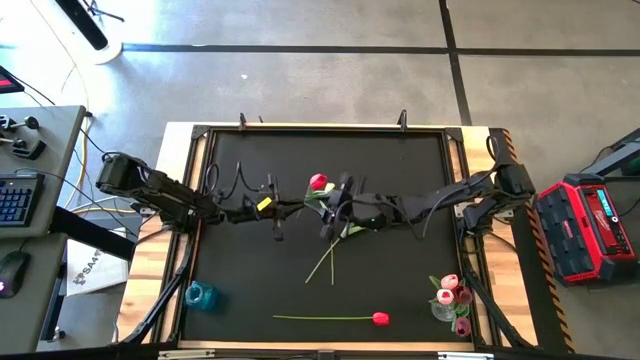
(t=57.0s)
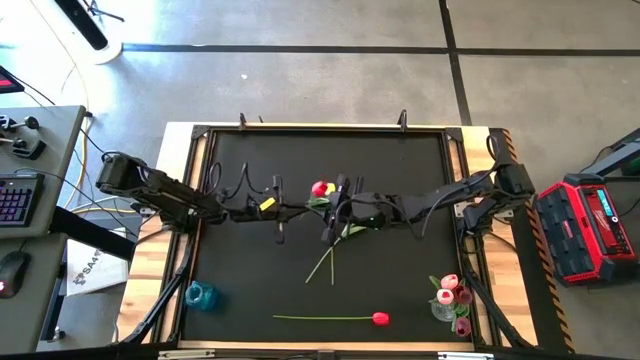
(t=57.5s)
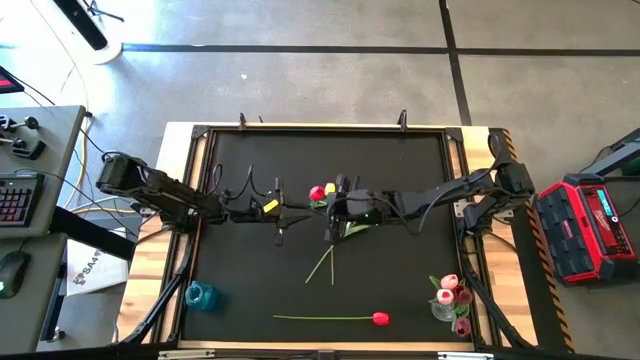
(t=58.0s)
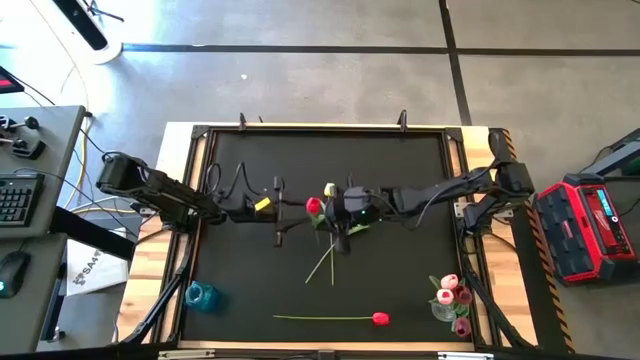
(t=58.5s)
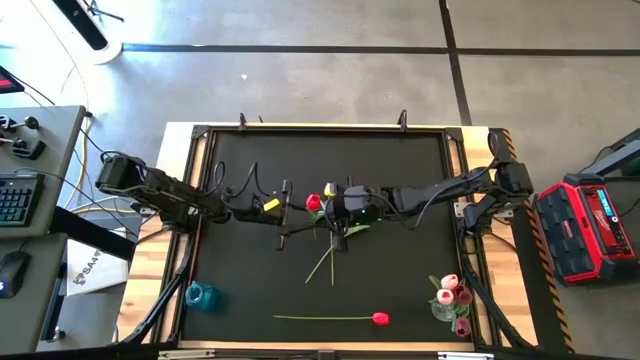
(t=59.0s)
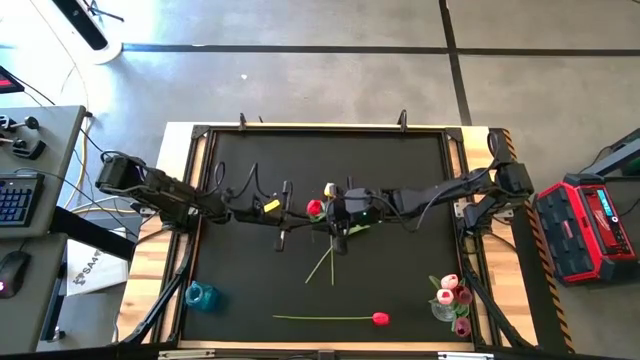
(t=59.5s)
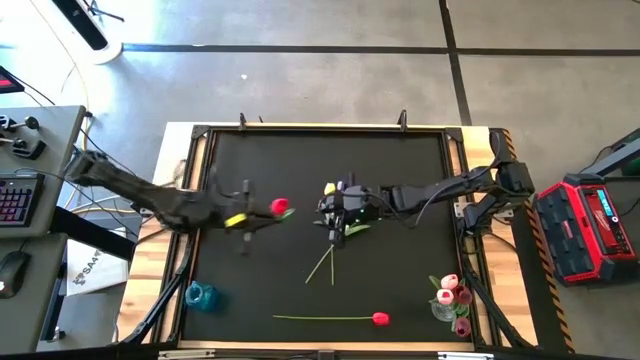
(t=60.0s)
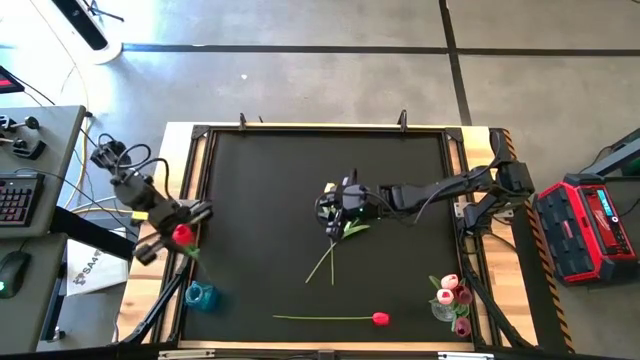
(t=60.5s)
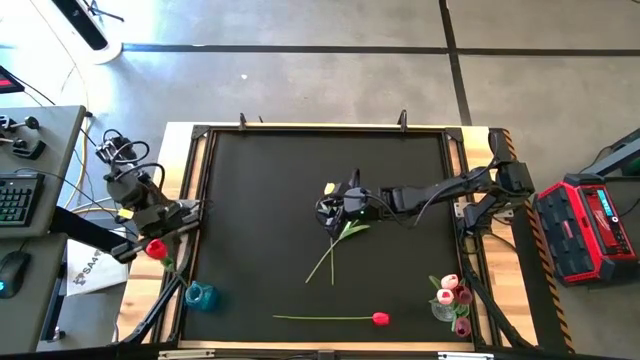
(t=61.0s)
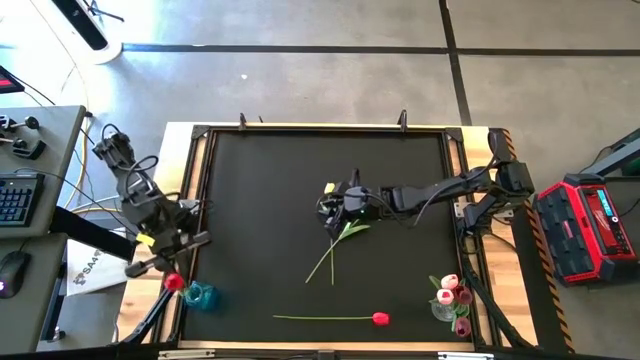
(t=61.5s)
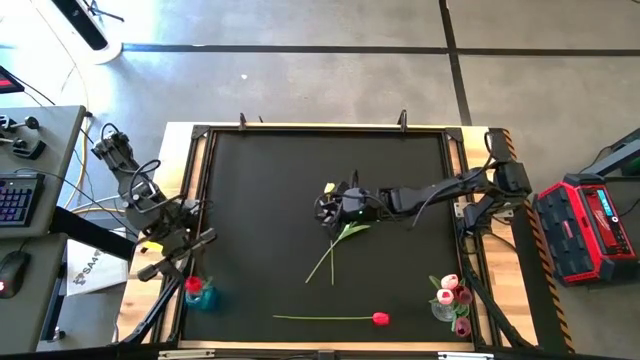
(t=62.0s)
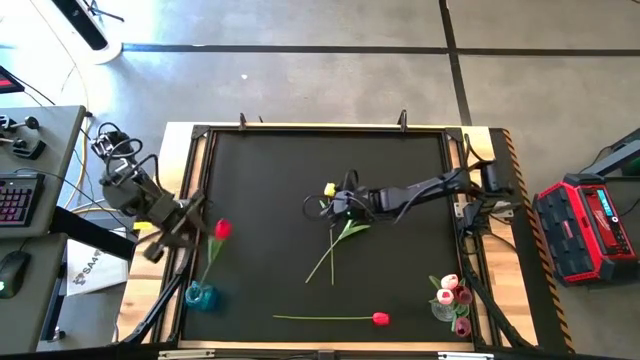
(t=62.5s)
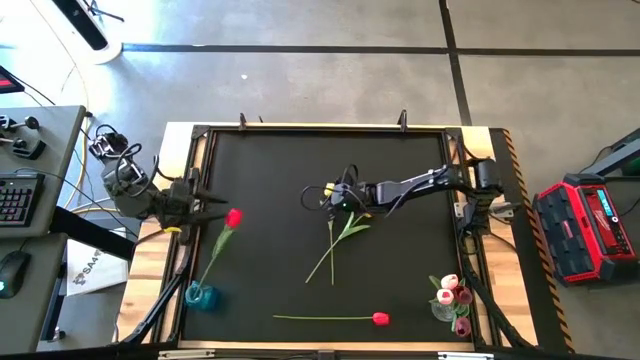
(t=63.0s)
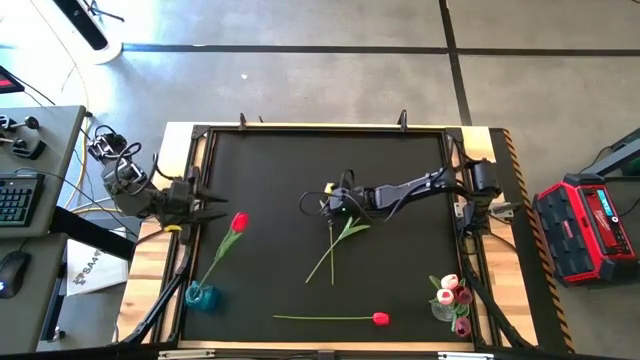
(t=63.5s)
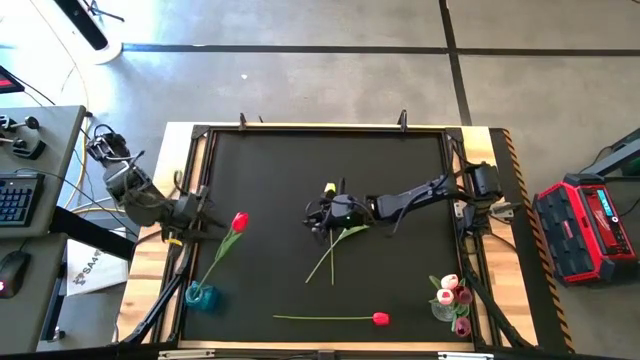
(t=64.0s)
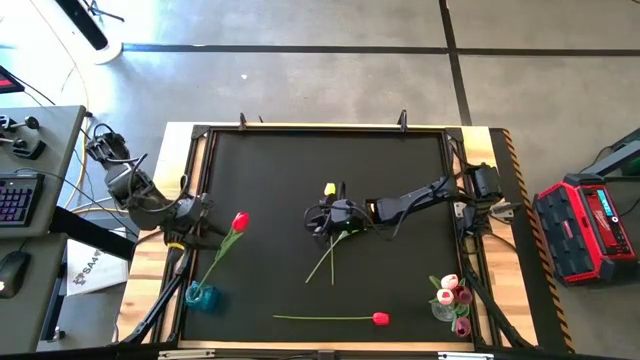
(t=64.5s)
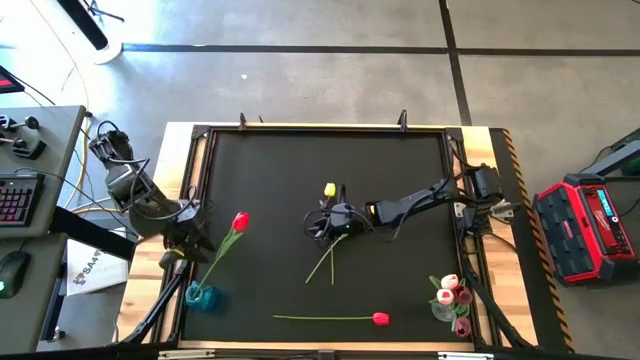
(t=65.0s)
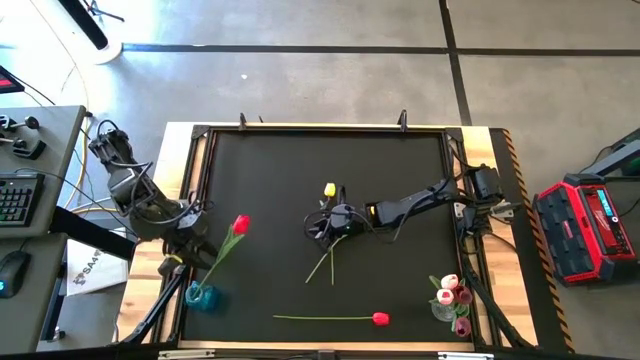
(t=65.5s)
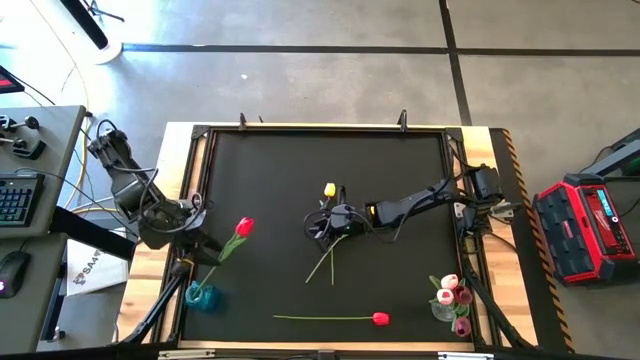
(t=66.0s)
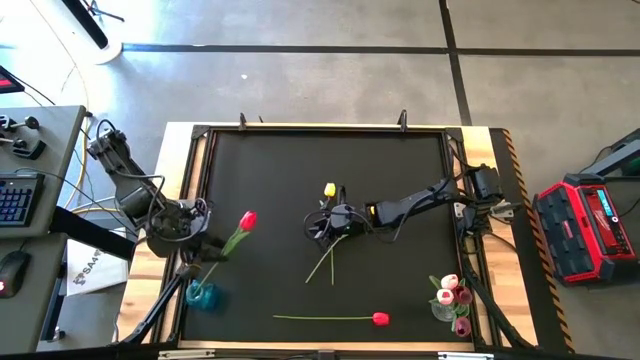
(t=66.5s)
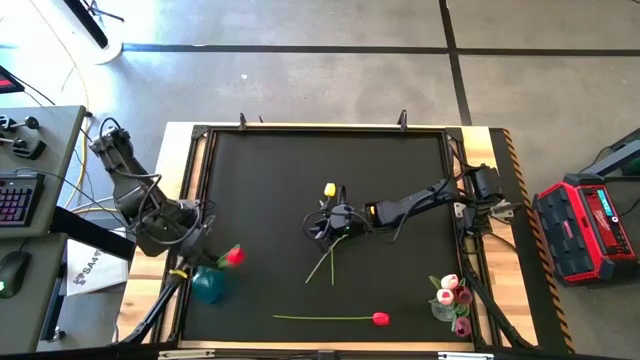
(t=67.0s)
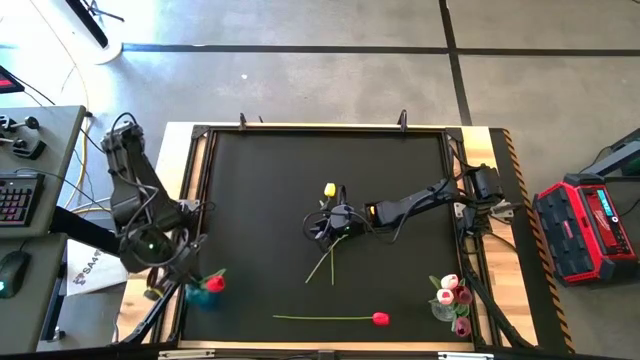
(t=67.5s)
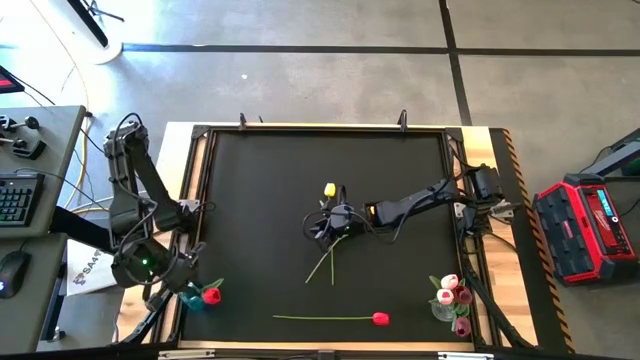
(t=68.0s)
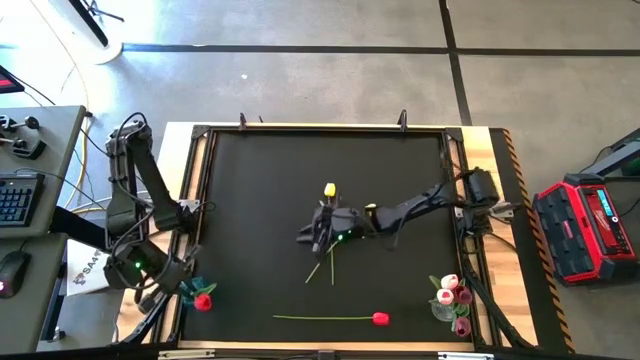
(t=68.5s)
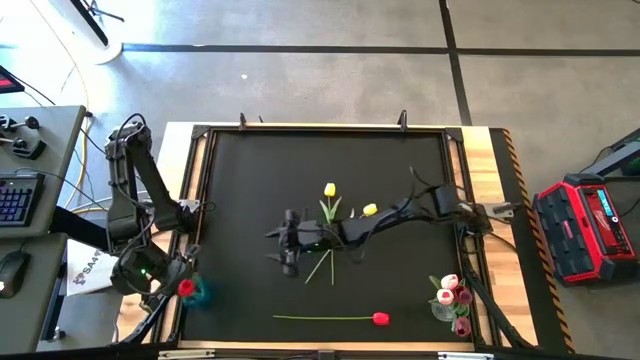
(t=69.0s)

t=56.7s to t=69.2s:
Task: Sort flowers into vase by color
Put the top red flower into the blue vase

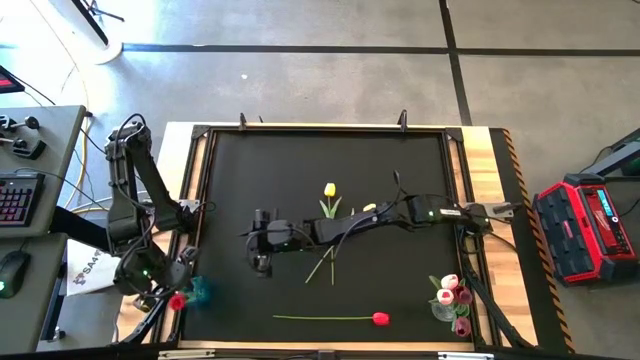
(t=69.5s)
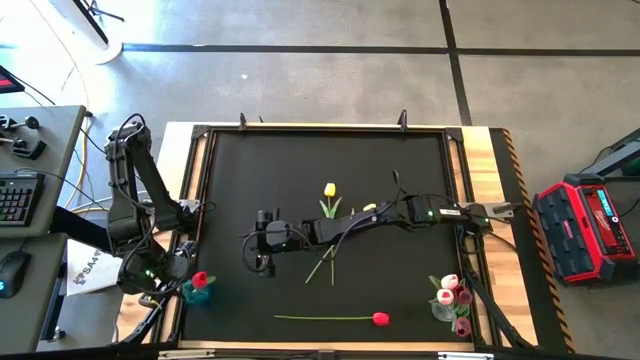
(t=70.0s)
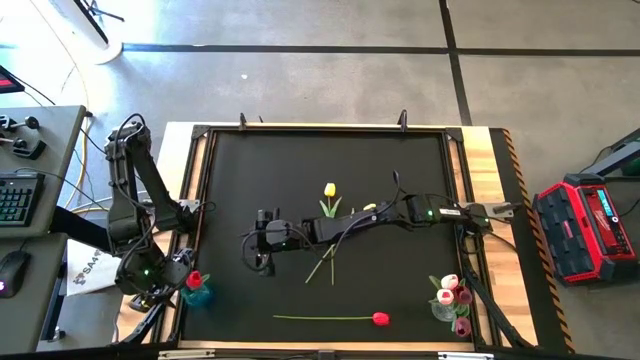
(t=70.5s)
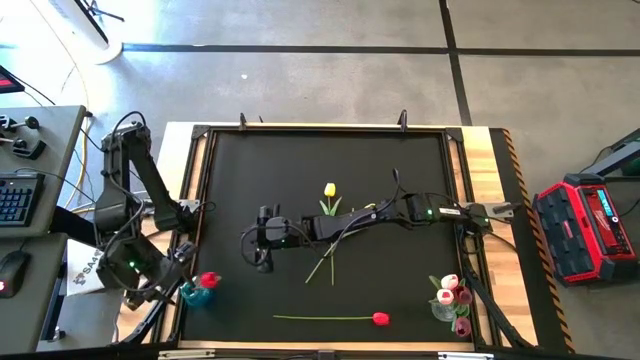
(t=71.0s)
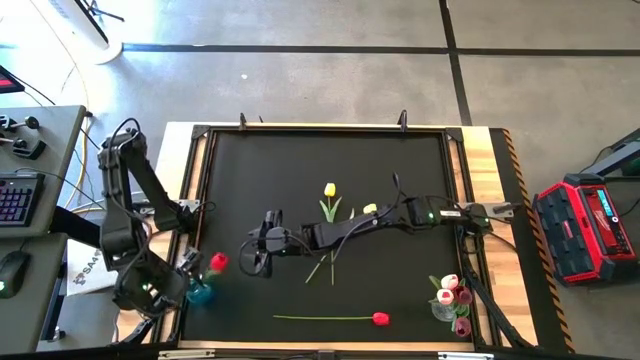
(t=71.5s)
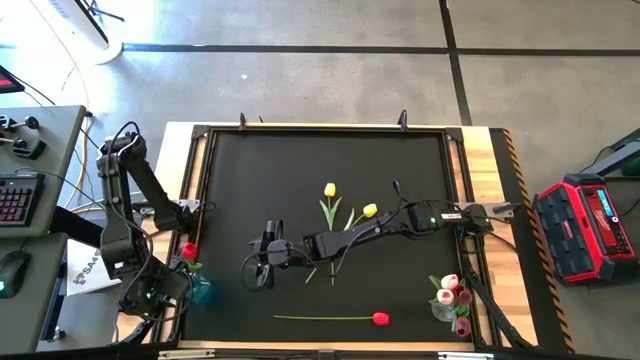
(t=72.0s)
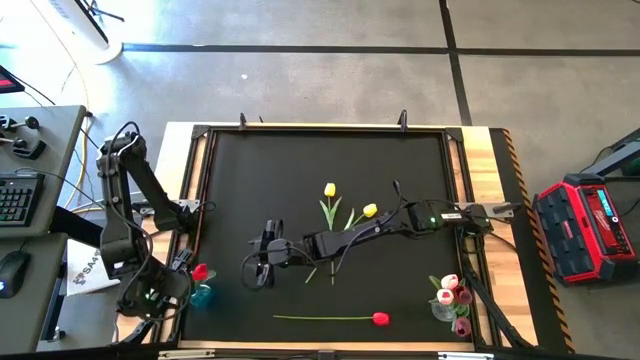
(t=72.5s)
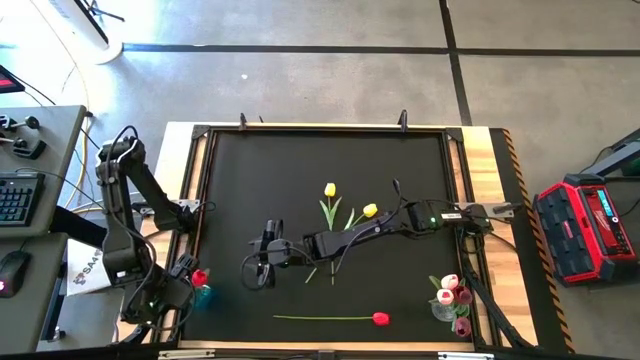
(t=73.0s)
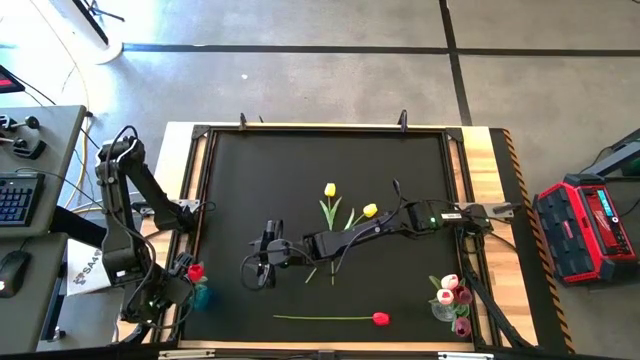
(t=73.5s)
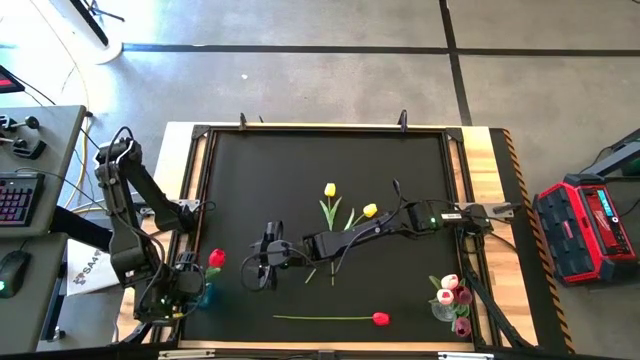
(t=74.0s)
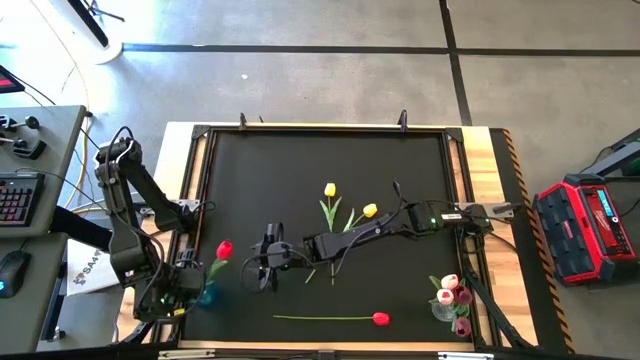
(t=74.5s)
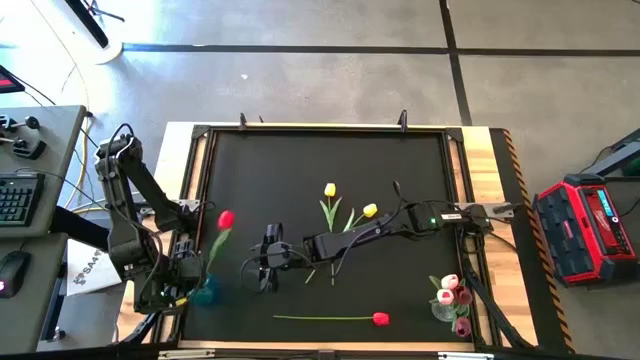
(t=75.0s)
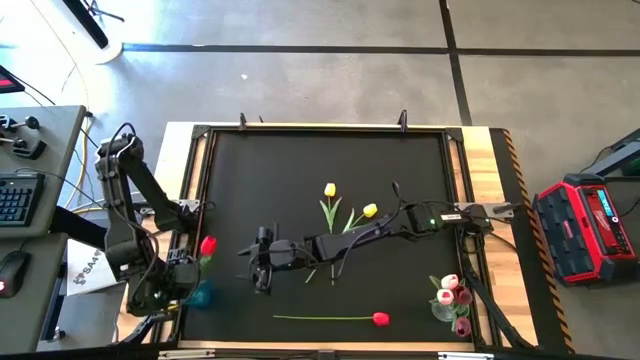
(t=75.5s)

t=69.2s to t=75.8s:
Move the blue vase to the middle left of the table

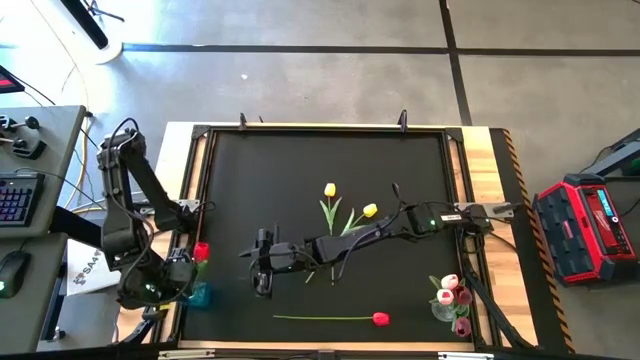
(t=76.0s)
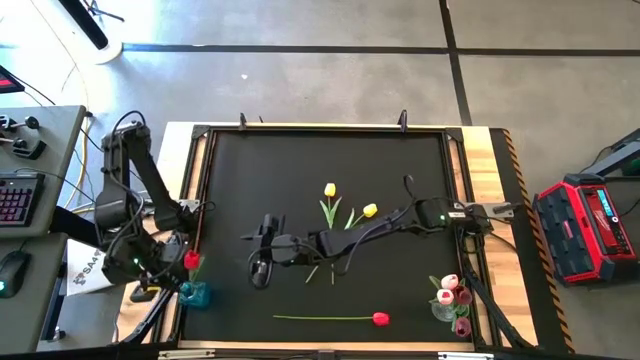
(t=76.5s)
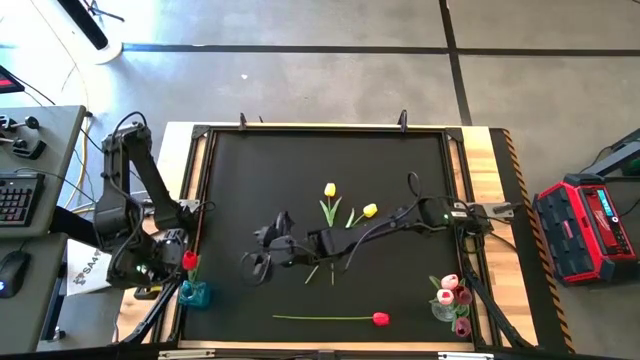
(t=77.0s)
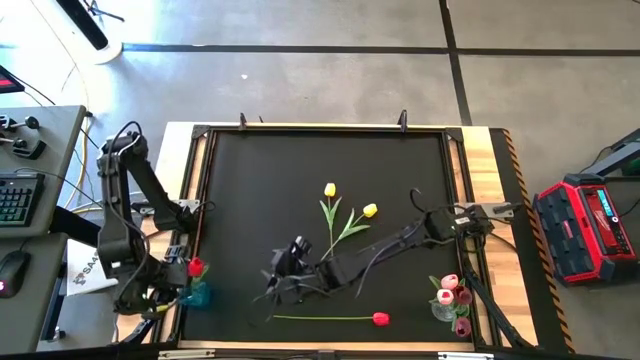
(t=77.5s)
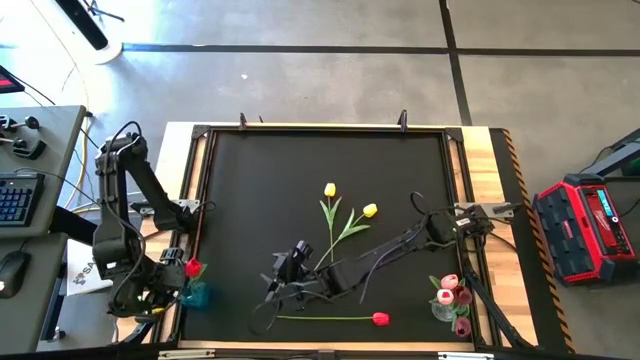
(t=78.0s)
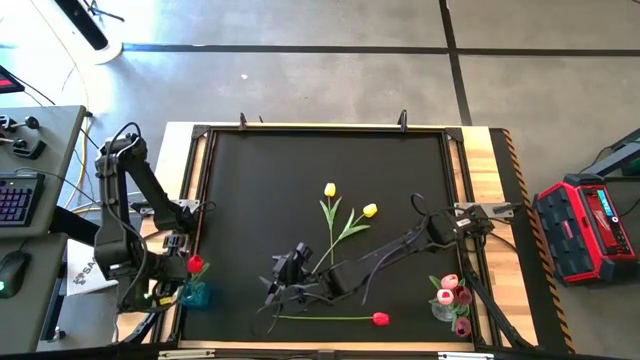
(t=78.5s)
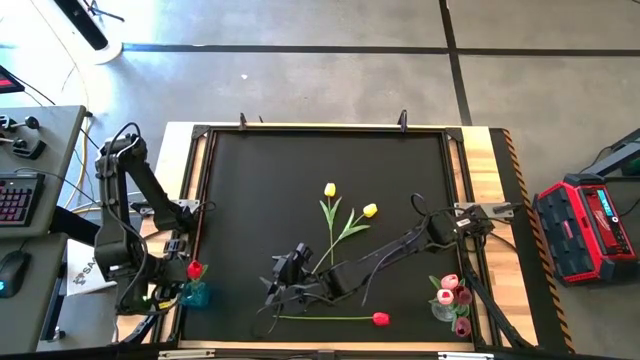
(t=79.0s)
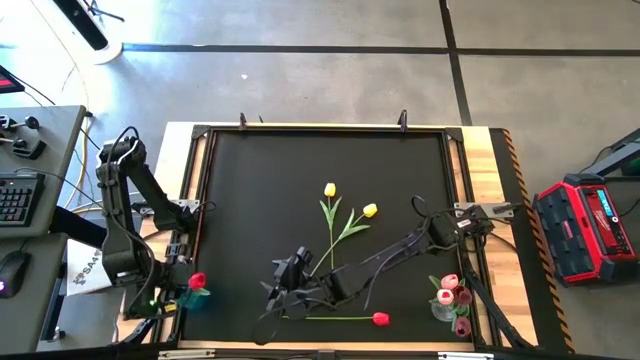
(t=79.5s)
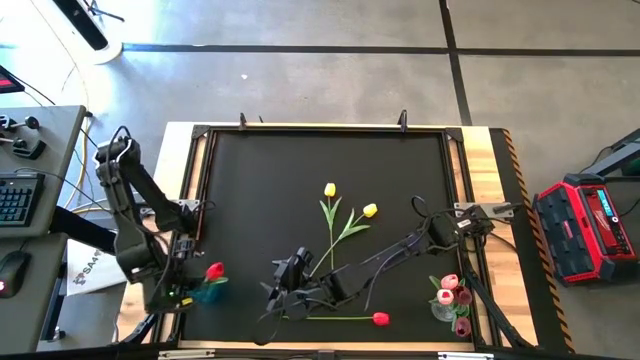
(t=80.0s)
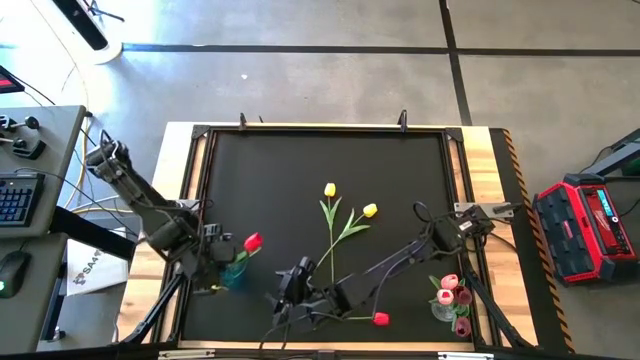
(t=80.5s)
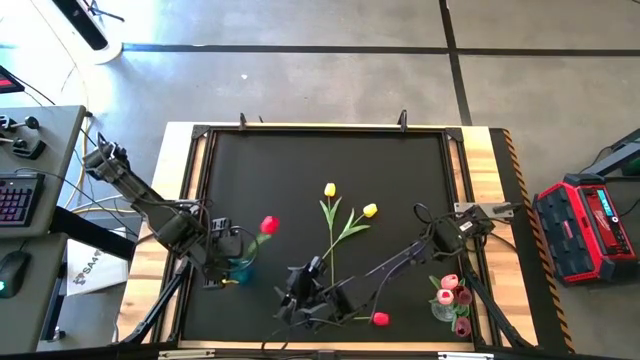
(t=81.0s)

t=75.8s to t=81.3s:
Move the blue vase to the middle left of the table
